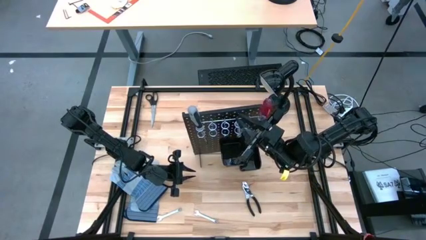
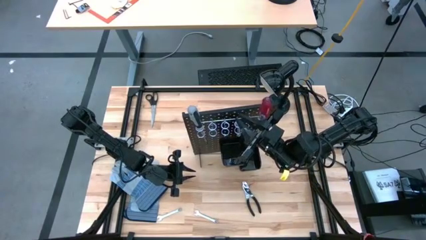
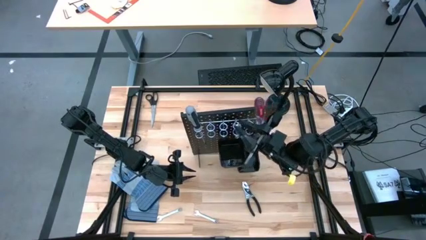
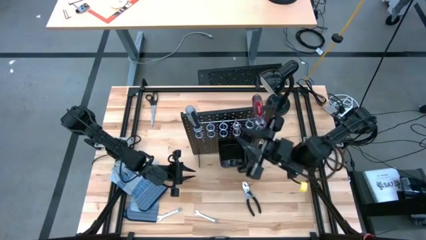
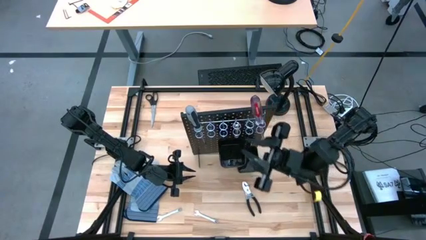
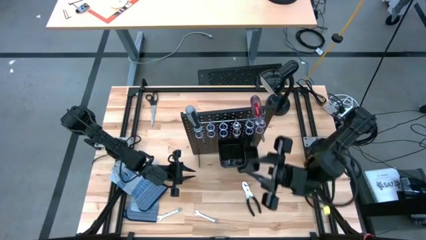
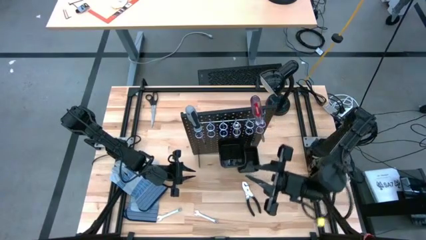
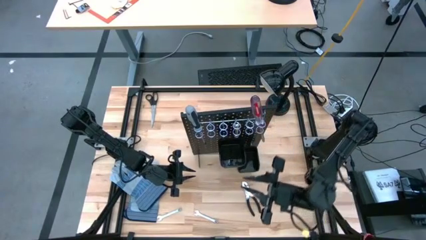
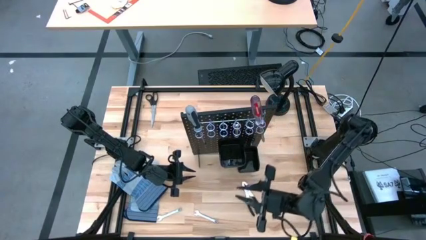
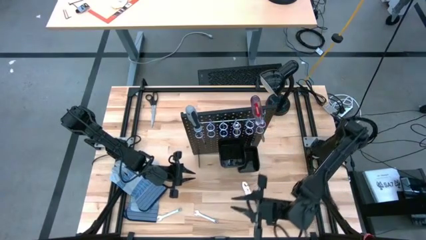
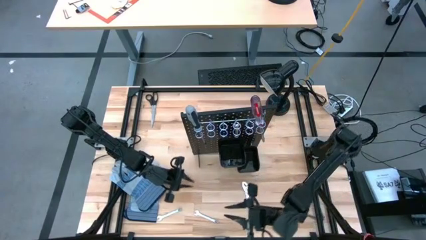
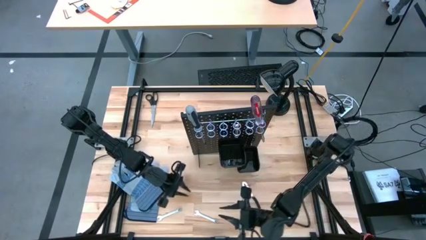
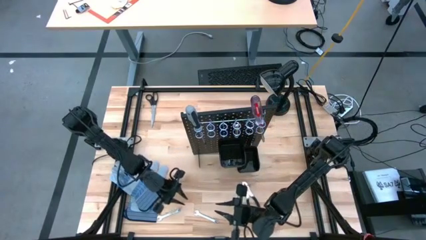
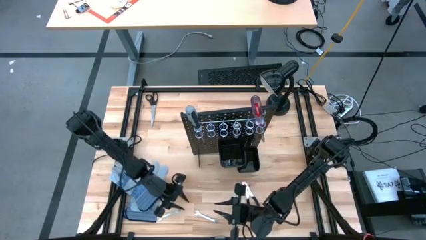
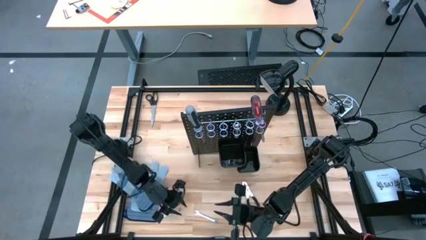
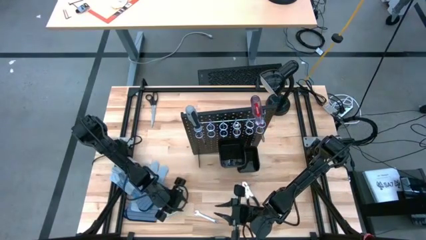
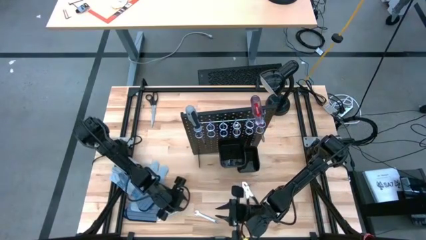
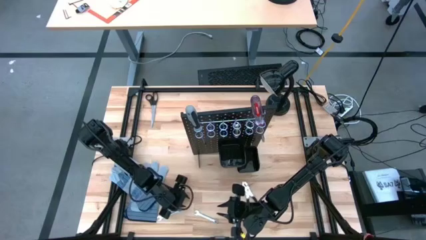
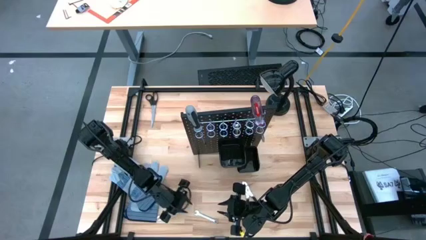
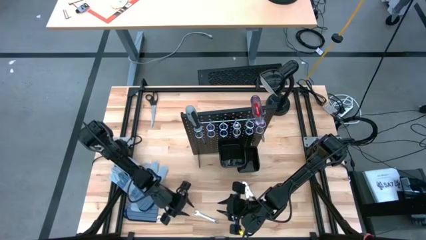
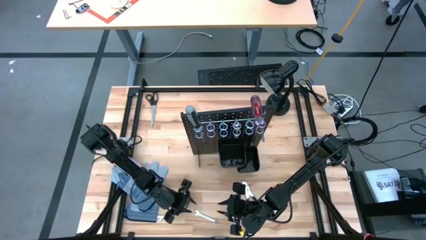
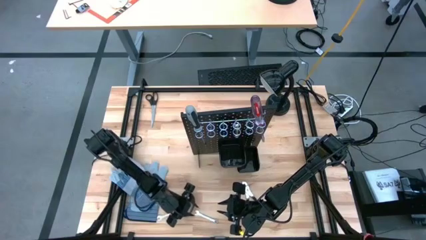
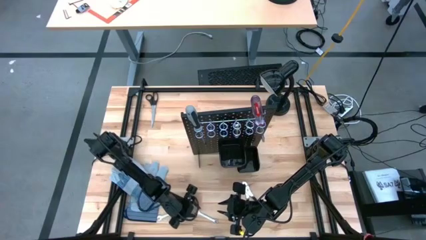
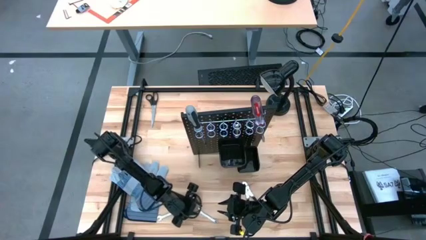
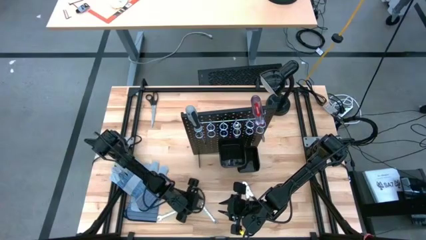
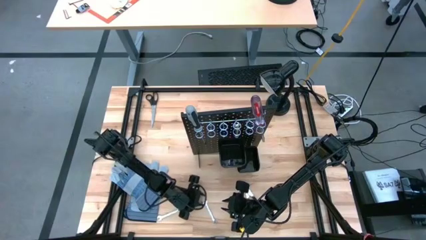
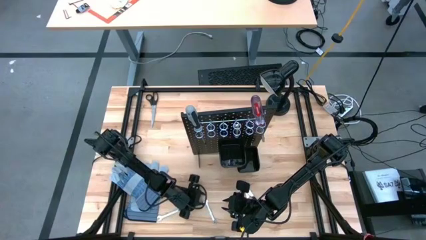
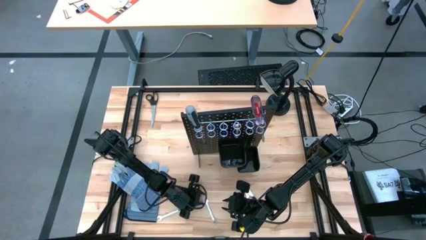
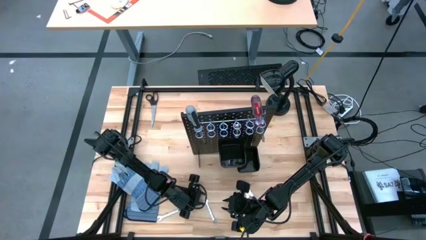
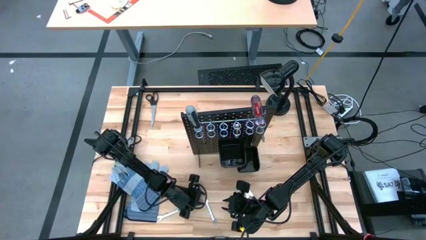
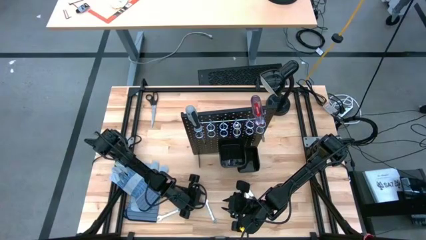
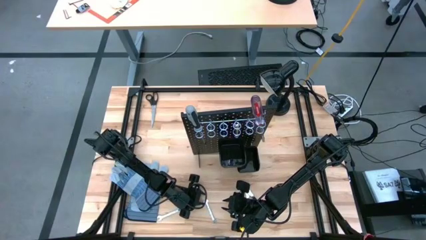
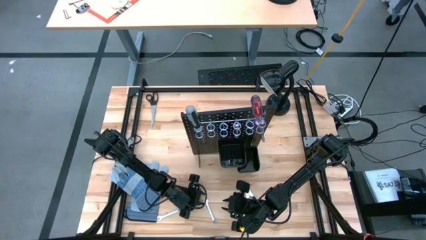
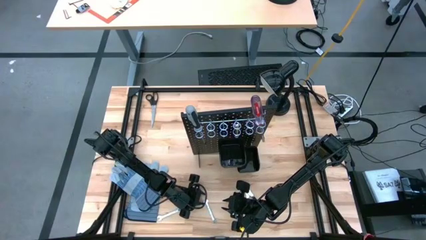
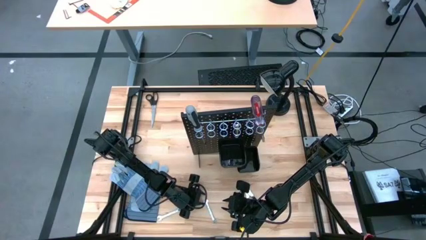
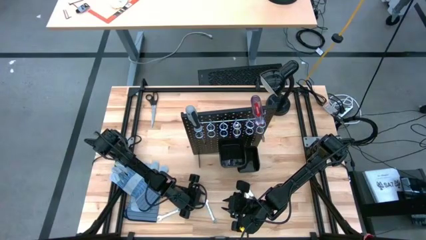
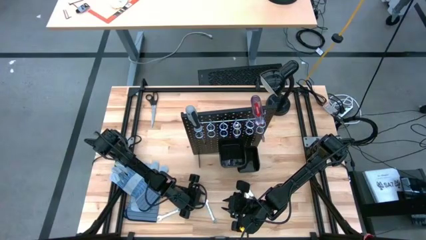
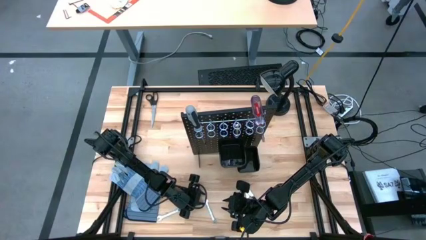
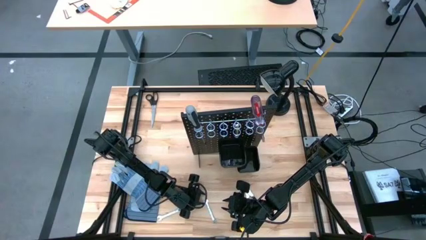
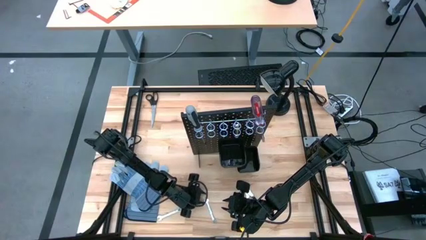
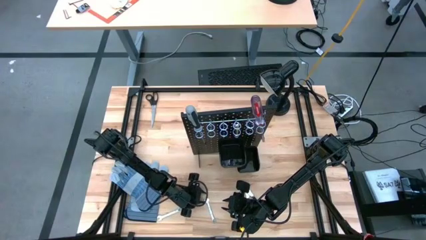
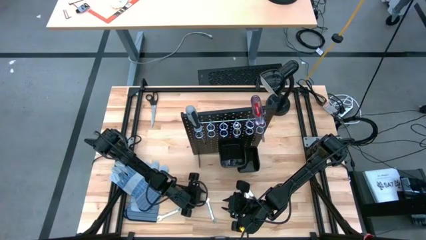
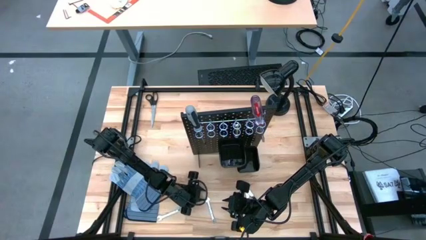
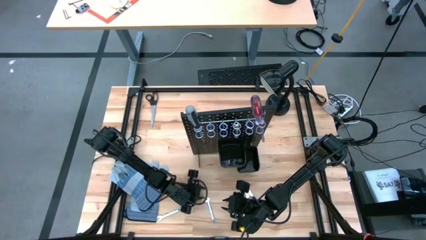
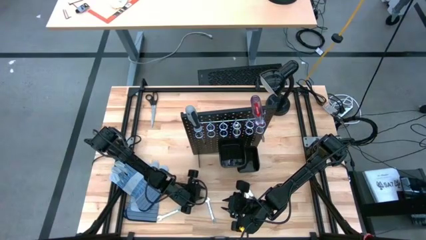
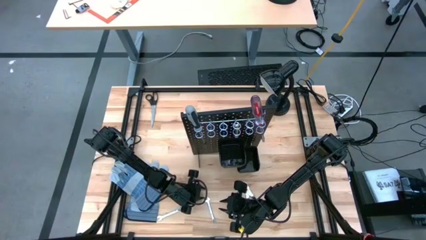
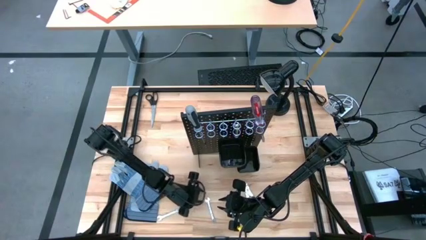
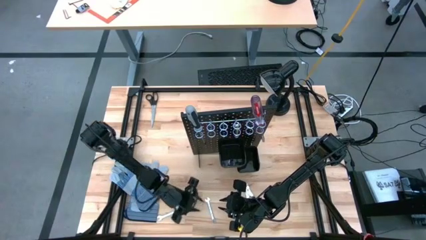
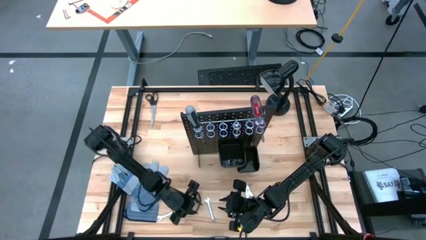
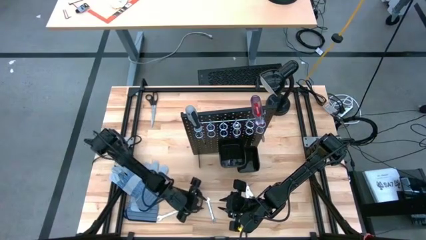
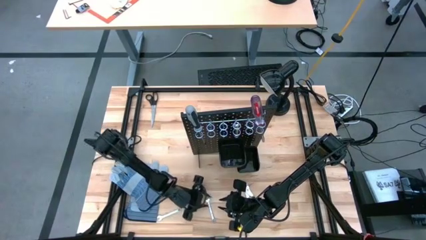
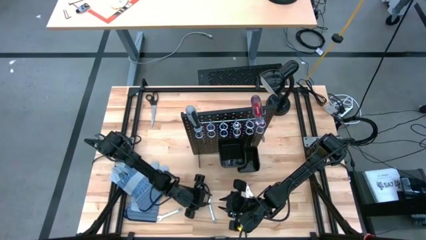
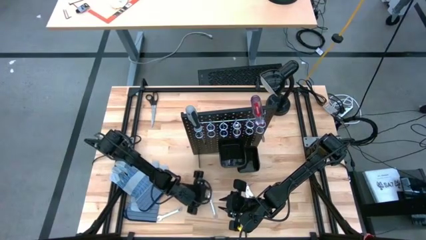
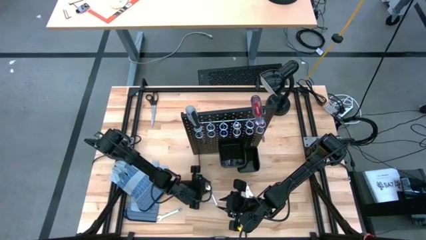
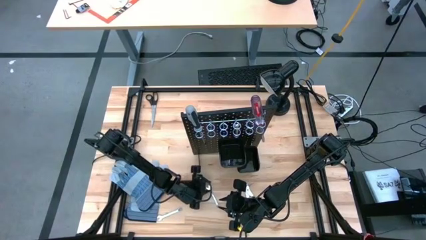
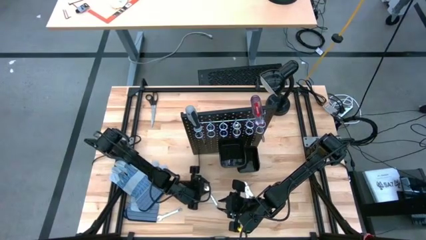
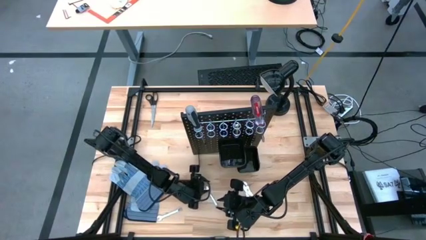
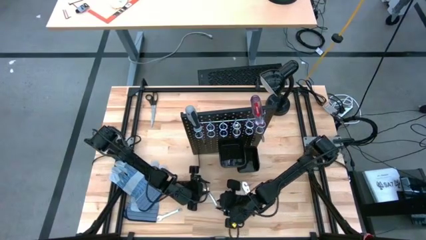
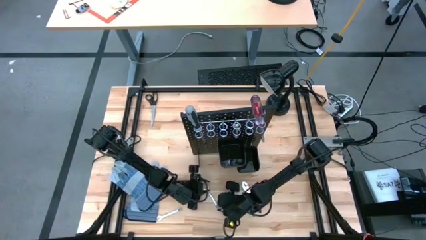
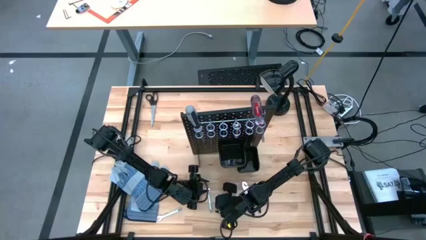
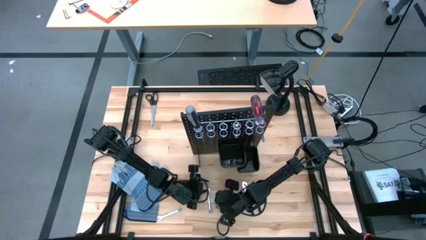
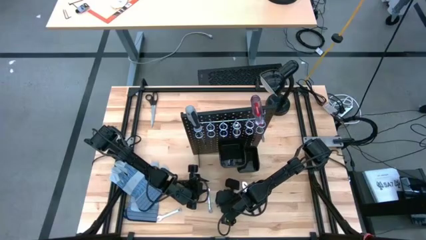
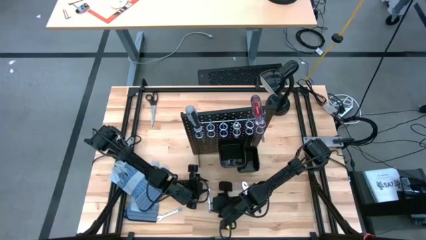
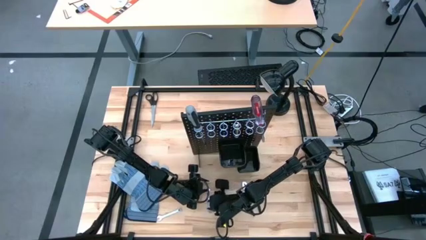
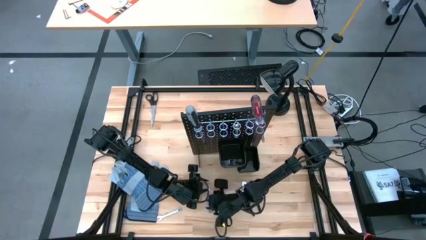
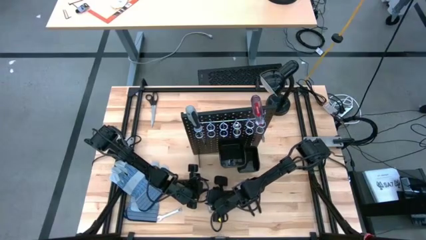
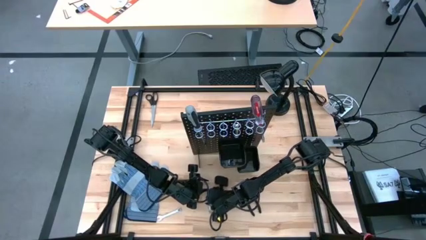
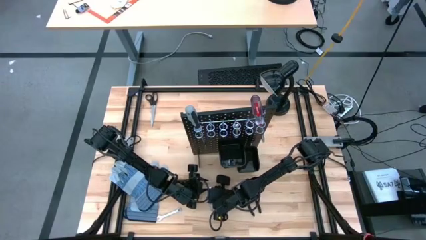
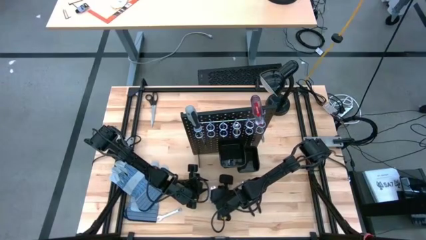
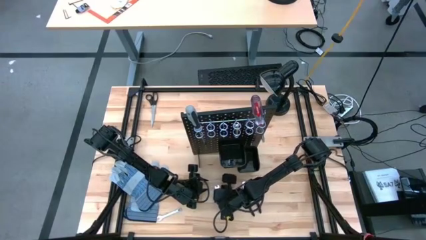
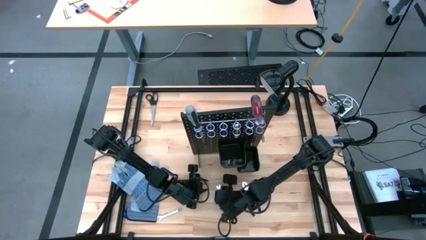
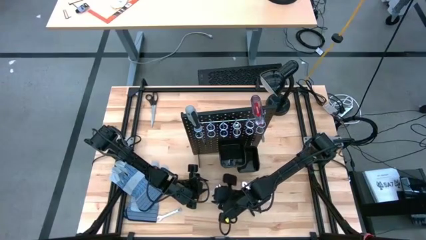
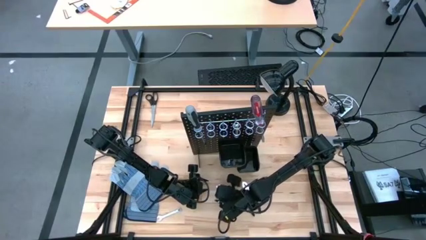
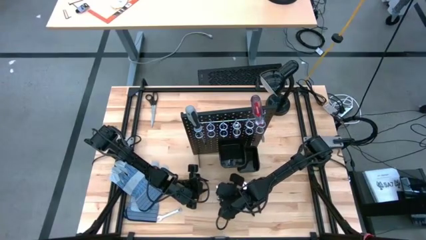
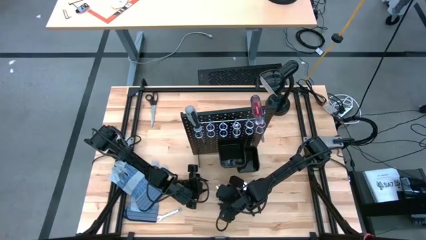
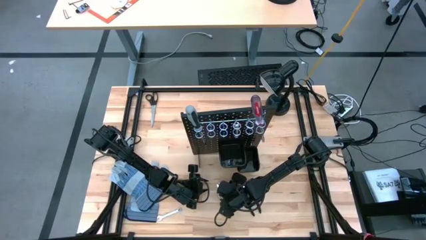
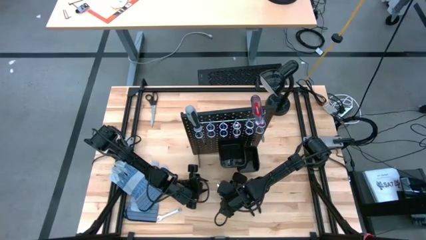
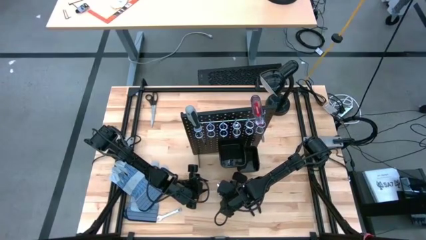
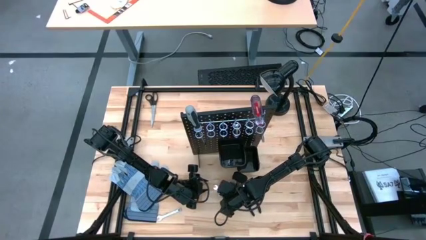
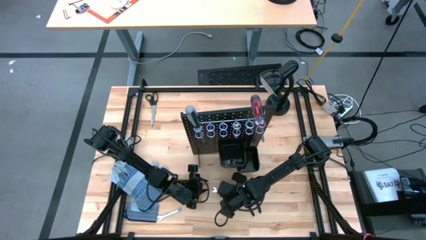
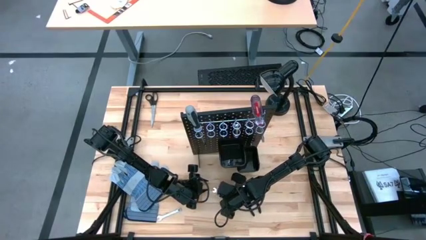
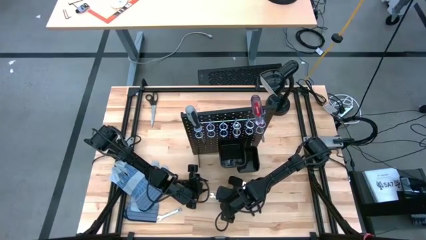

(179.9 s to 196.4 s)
Task: Hang tools onto peg board
Hang the silver wrench on the black peg board
